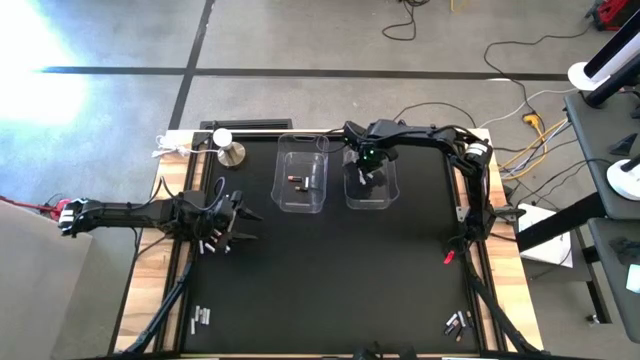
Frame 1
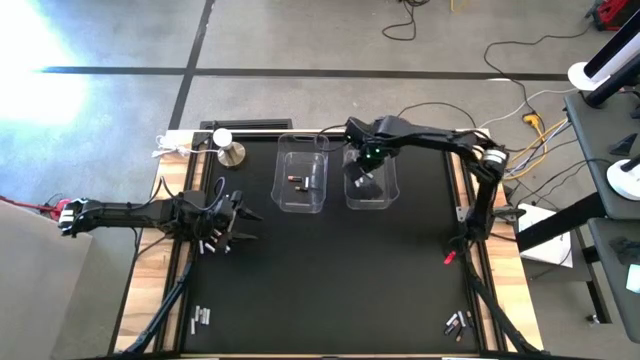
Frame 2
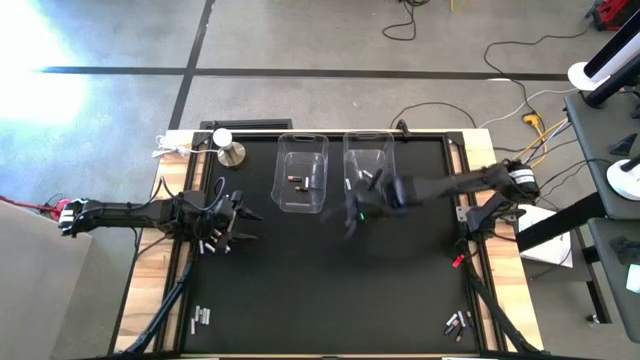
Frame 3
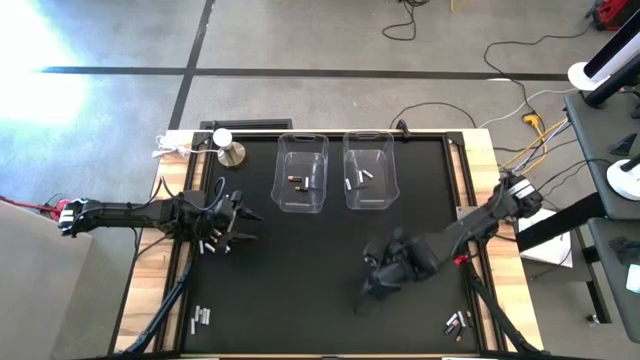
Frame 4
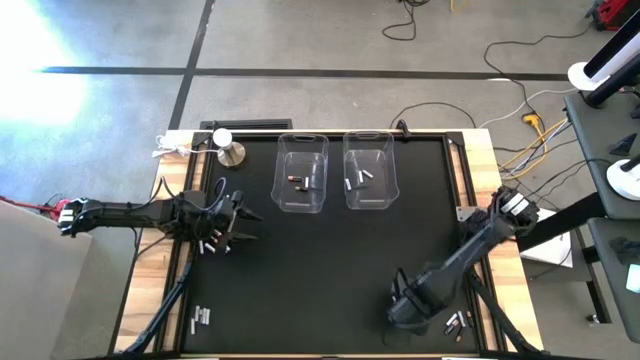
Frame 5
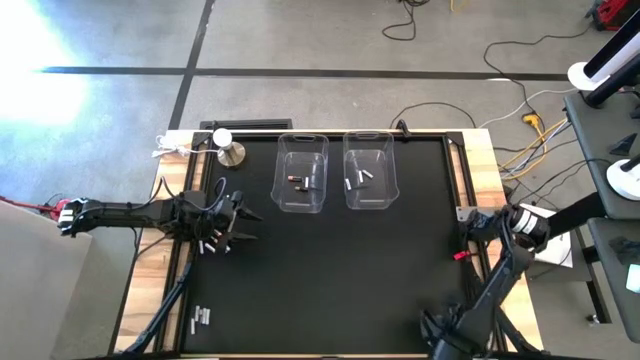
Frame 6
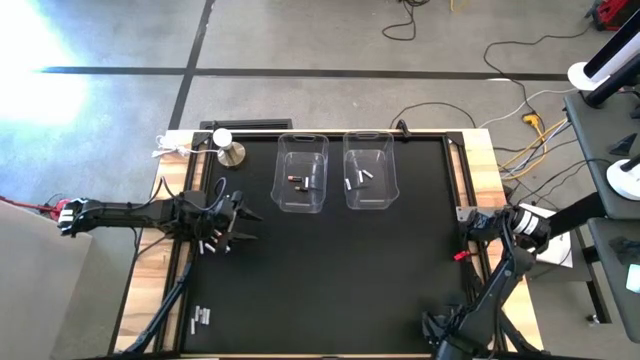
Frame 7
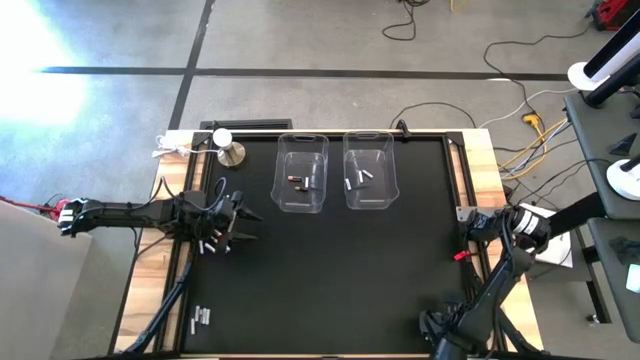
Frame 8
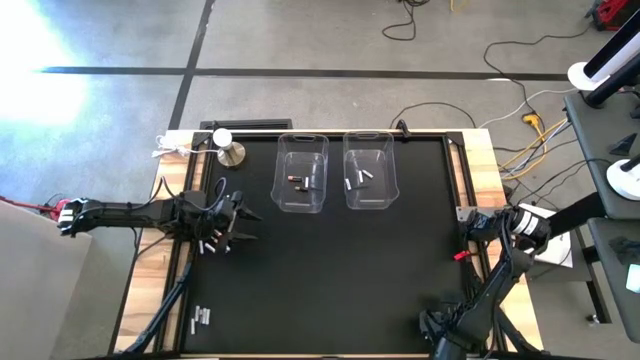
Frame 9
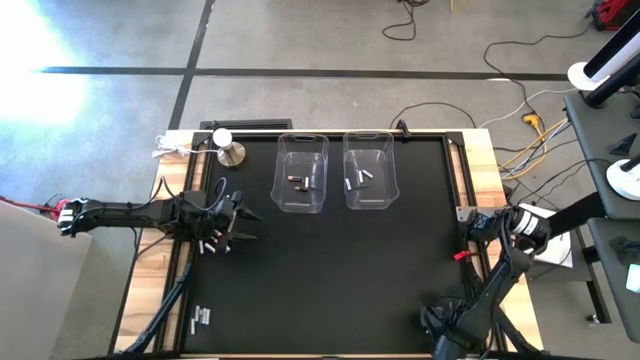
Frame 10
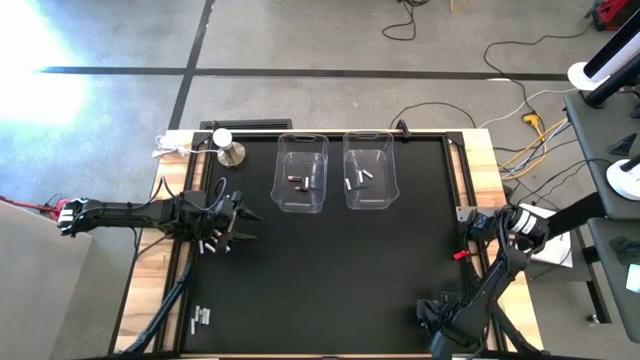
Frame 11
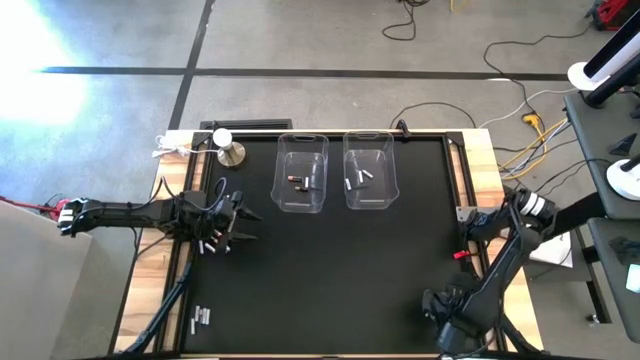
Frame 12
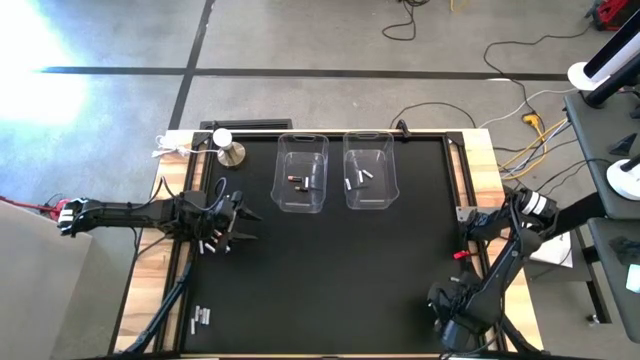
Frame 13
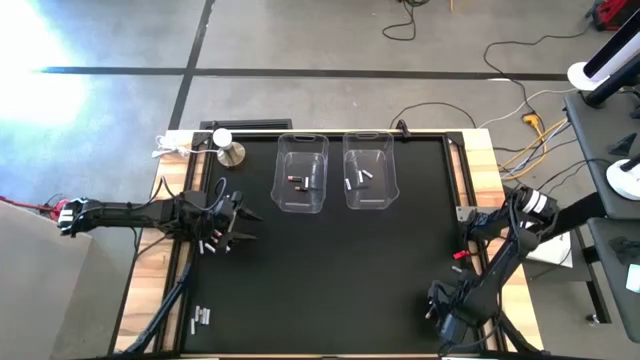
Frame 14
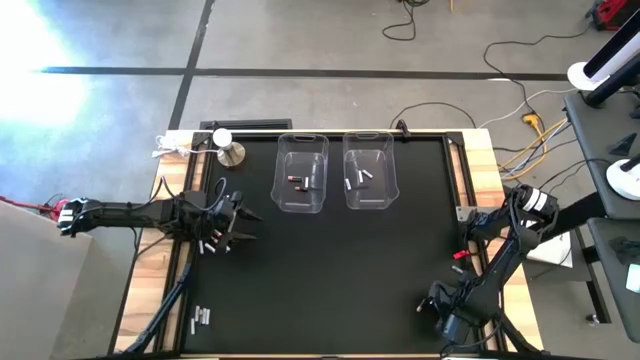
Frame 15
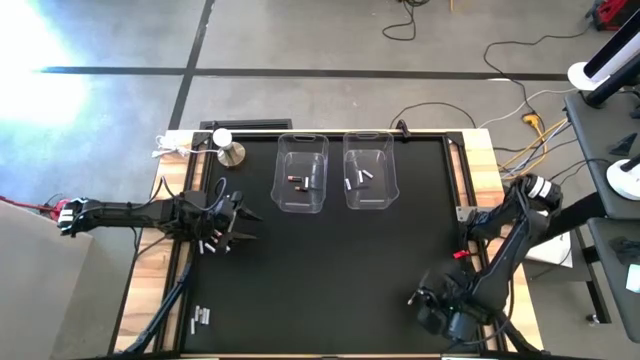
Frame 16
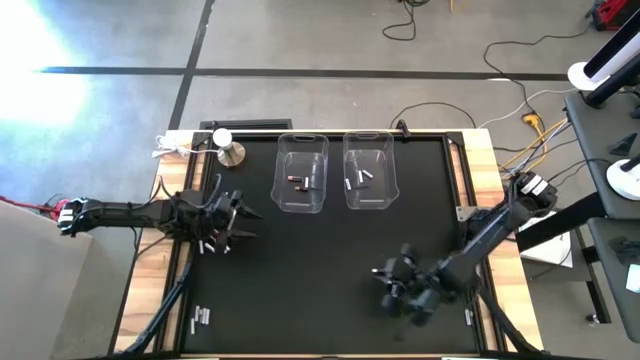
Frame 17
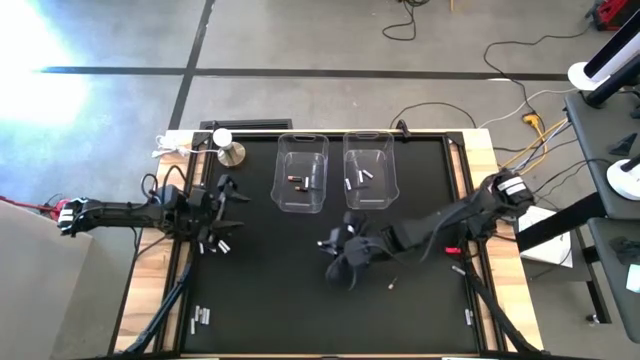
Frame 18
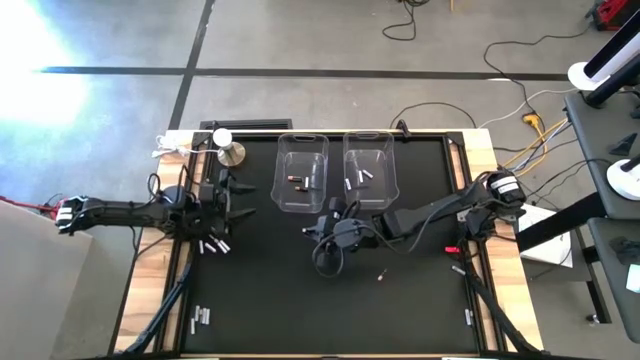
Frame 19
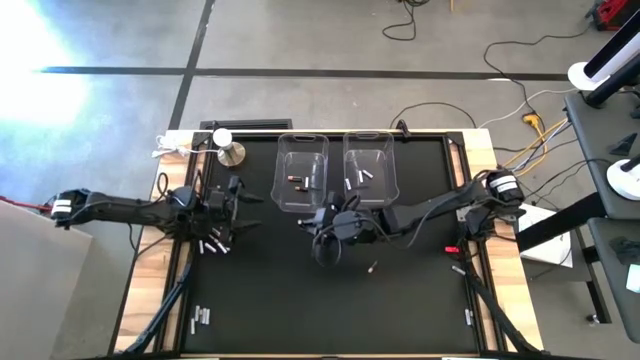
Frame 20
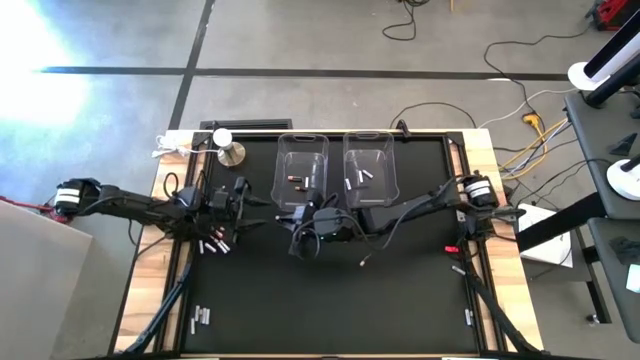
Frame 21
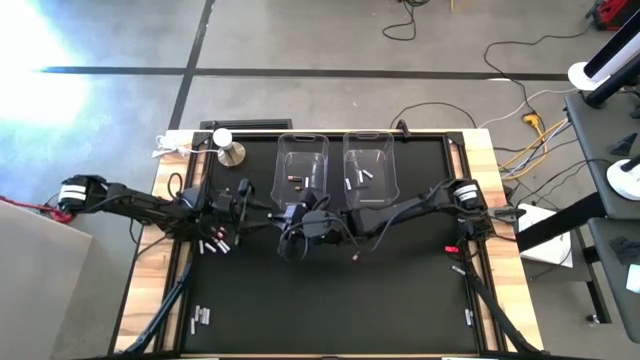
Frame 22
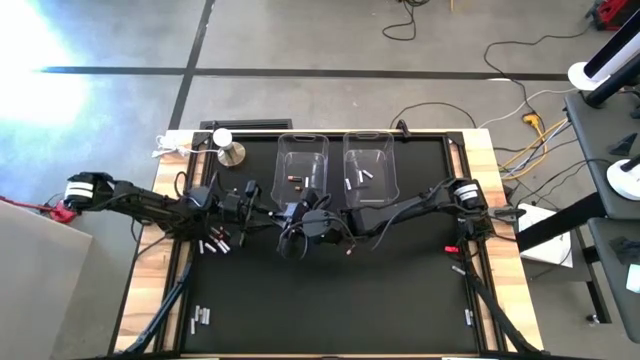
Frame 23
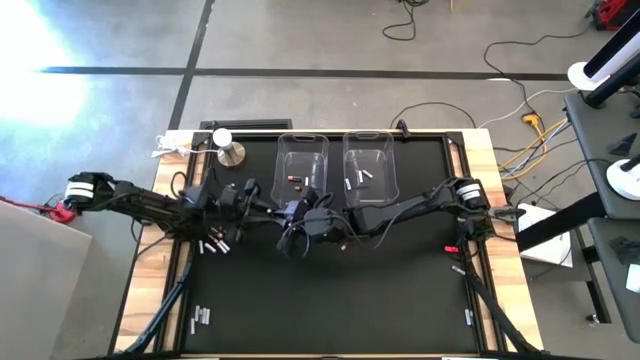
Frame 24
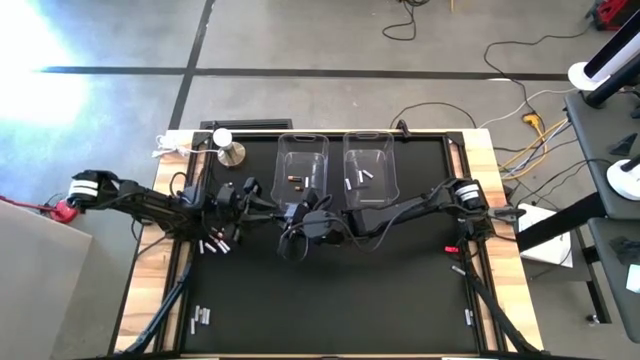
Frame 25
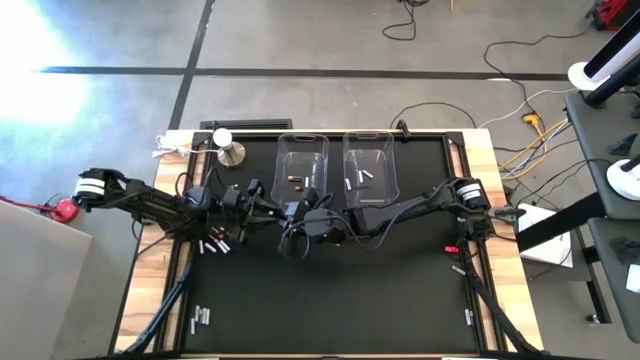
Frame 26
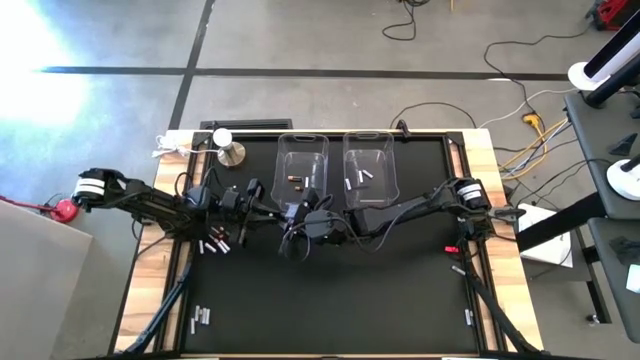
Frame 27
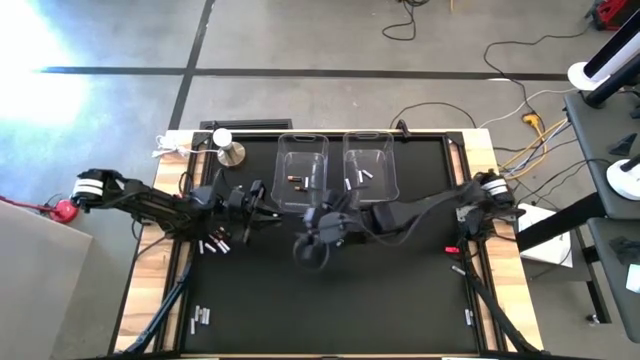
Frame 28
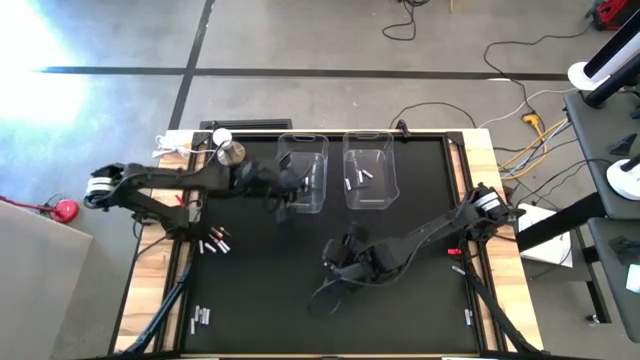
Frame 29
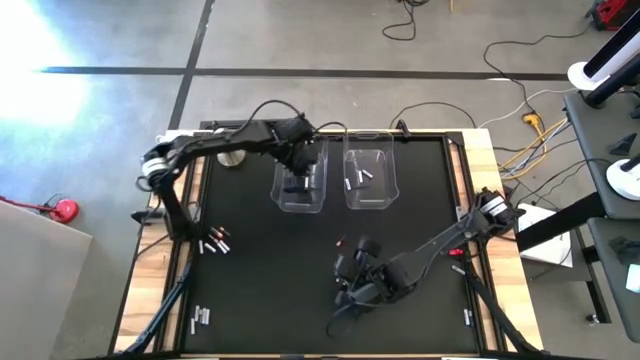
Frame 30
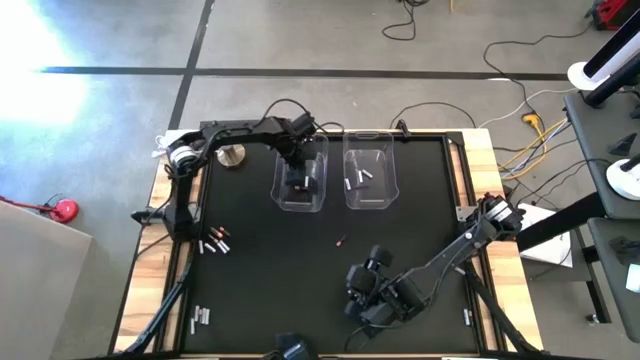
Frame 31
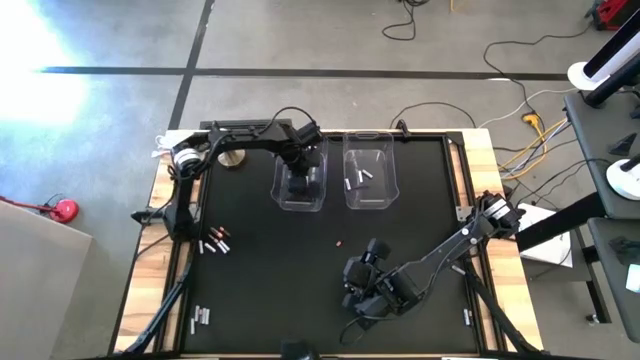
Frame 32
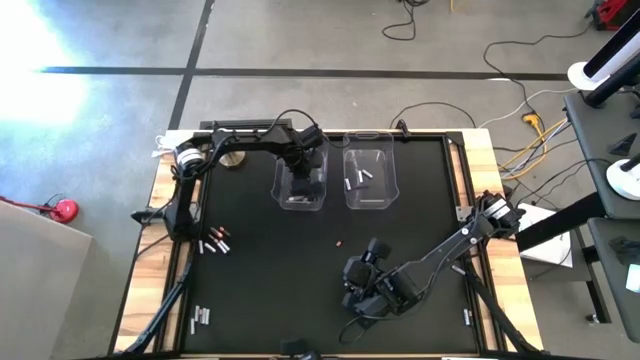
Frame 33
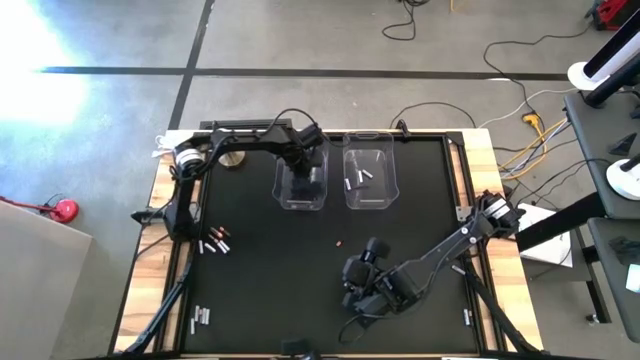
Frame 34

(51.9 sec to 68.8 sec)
Task: Sort batteries
Put the black battery into the left transparent bin

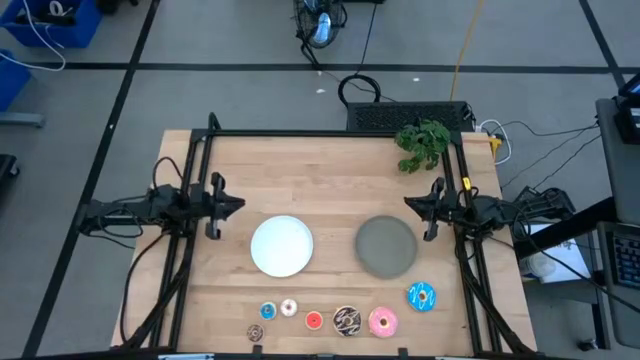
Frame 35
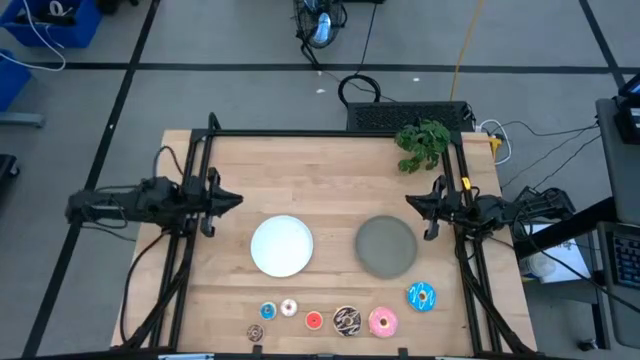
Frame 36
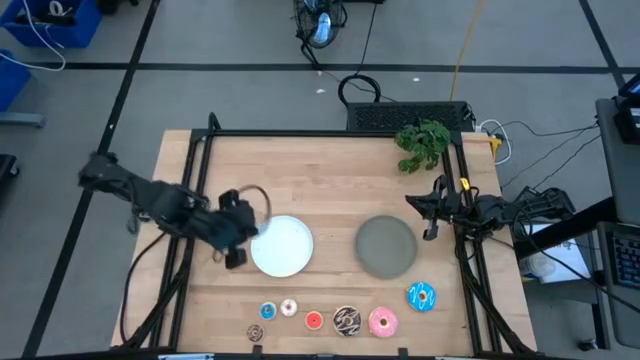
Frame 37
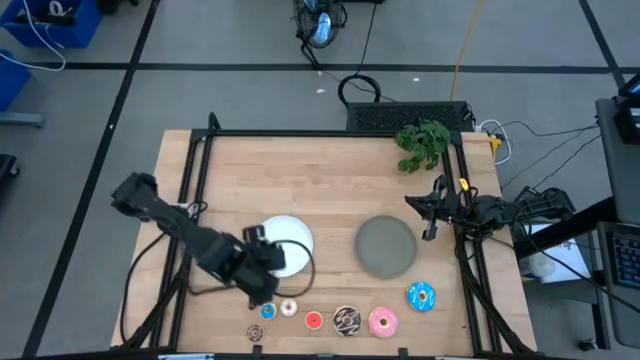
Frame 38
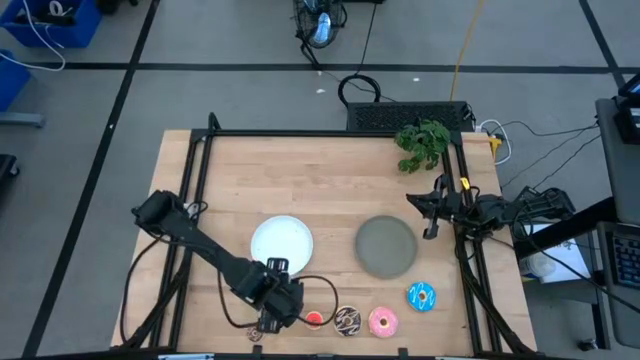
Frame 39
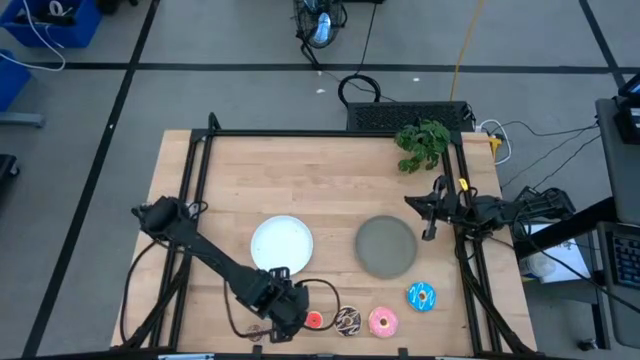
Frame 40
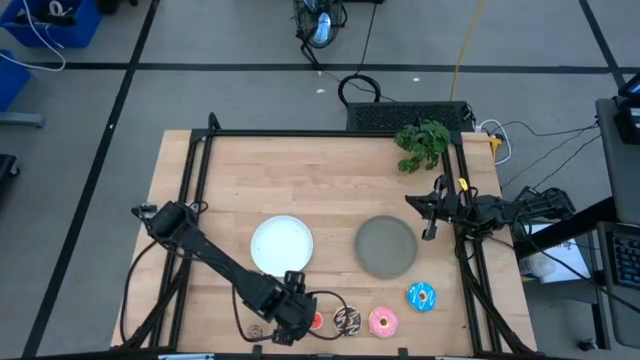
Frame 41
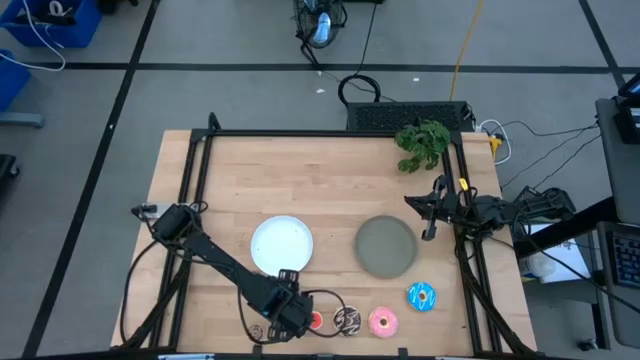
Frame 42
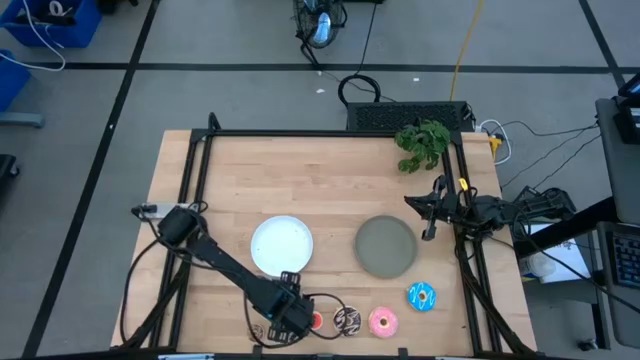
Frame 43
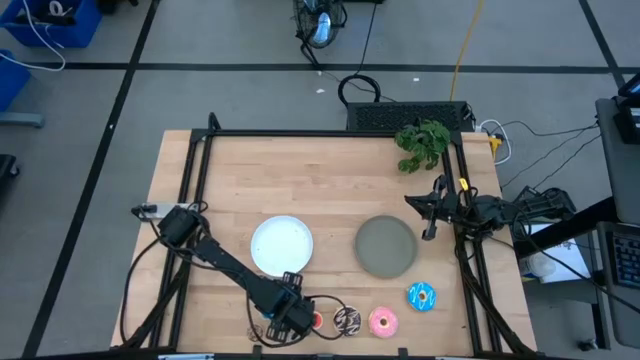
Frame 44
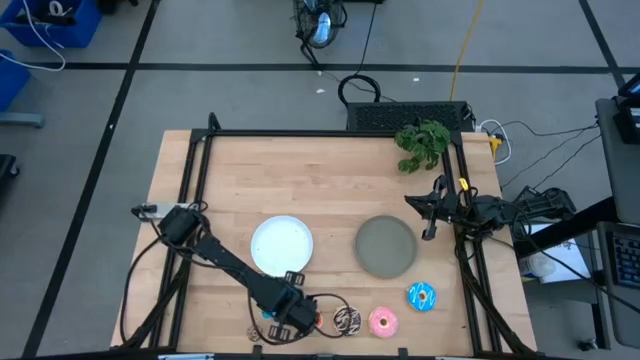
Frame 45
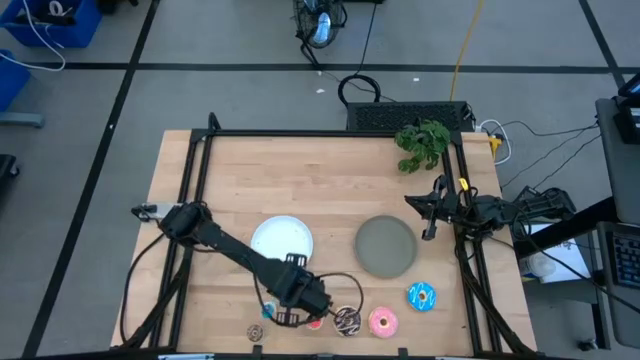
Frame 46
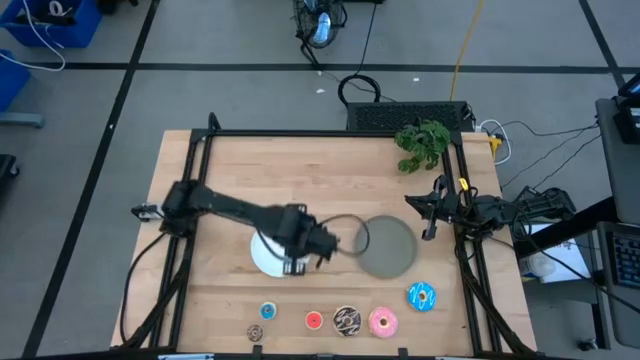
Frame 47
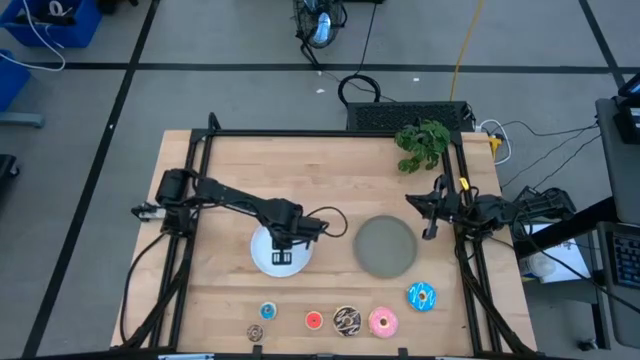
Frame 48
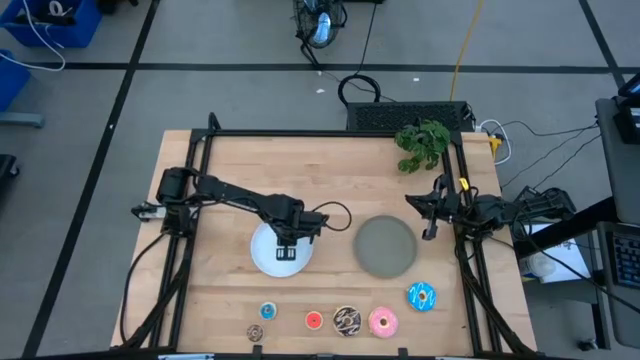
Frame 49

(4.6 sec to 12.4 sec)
Task: Pick & Place donuts
Put the small white donut on the white plate
